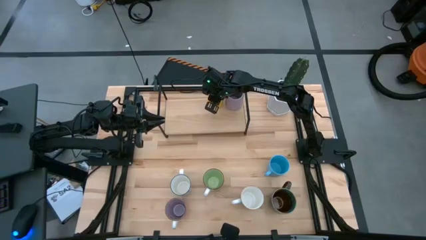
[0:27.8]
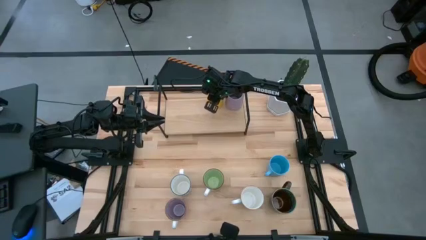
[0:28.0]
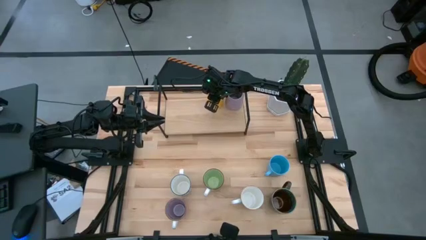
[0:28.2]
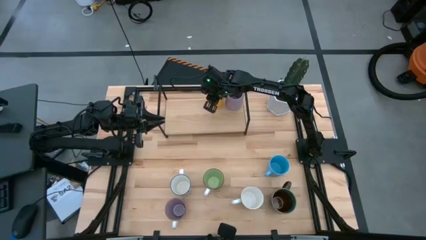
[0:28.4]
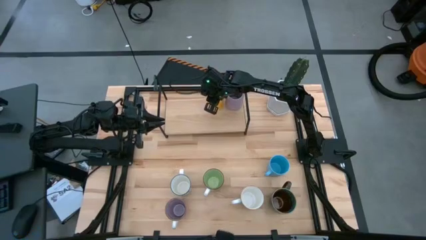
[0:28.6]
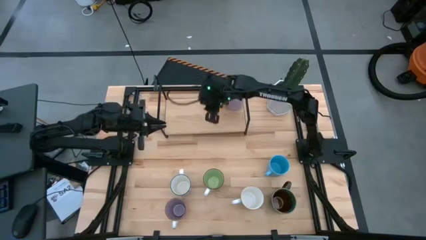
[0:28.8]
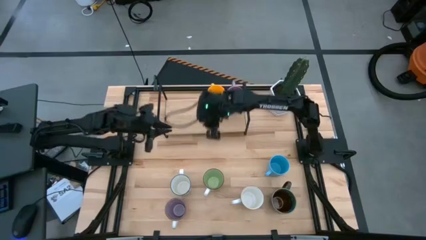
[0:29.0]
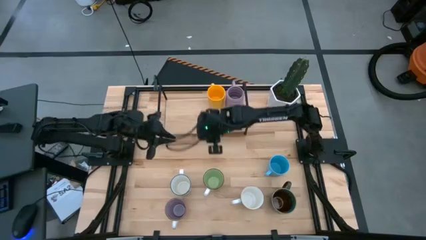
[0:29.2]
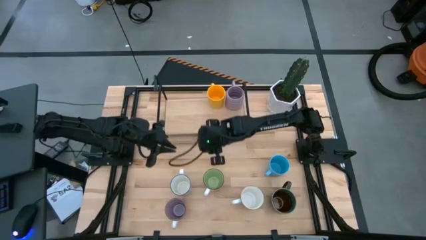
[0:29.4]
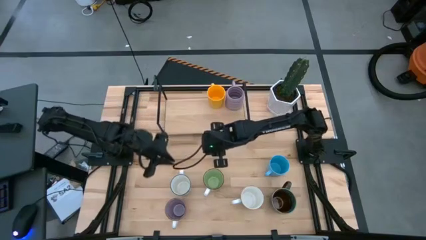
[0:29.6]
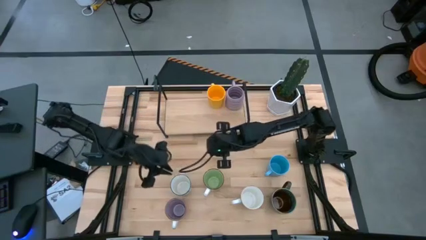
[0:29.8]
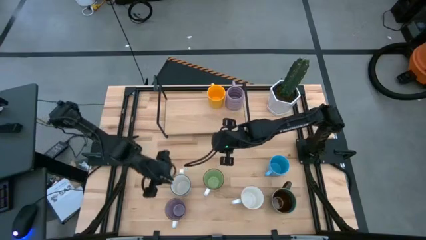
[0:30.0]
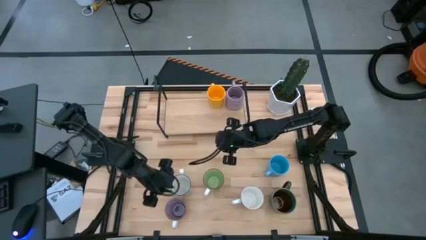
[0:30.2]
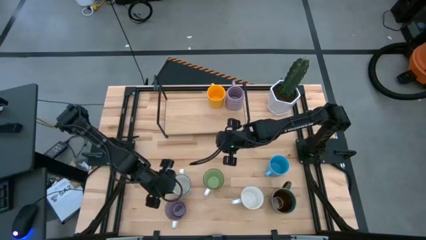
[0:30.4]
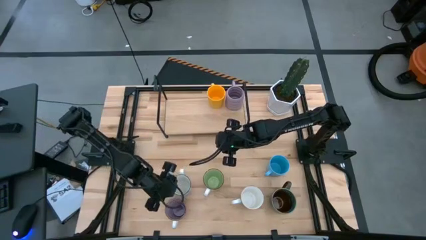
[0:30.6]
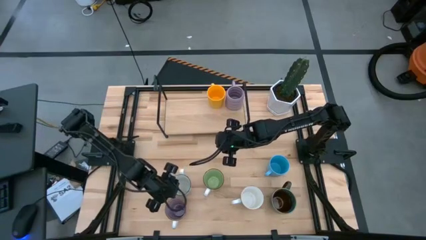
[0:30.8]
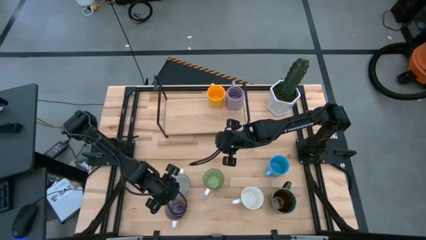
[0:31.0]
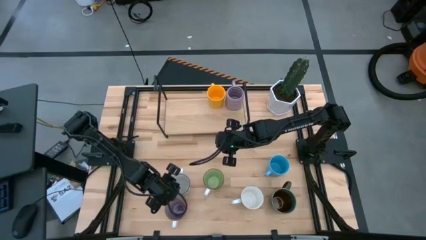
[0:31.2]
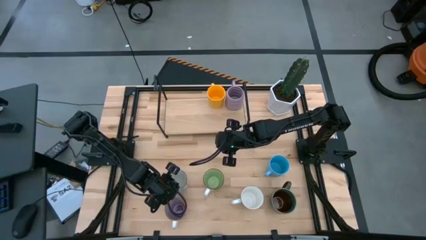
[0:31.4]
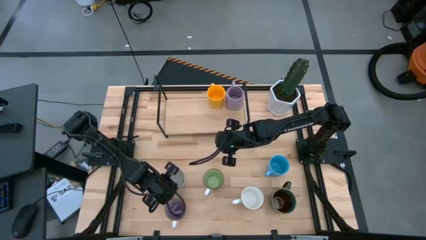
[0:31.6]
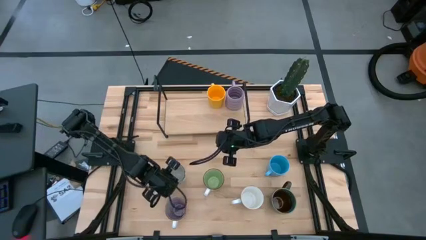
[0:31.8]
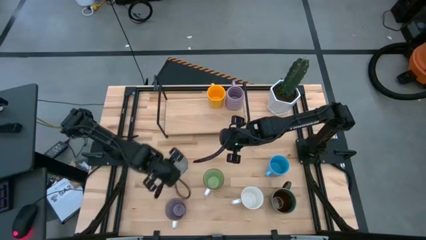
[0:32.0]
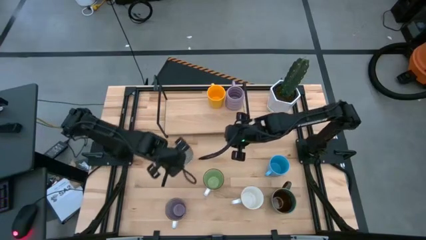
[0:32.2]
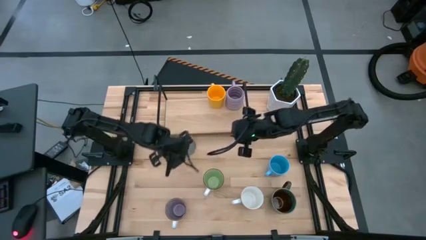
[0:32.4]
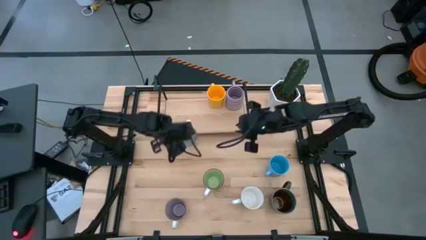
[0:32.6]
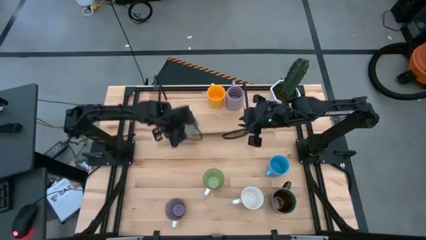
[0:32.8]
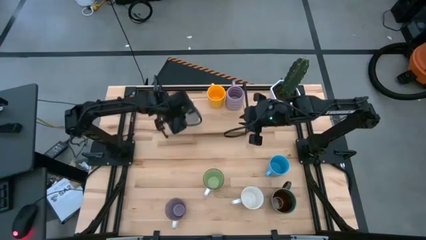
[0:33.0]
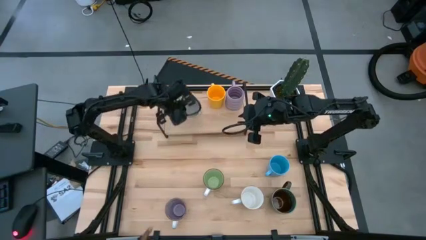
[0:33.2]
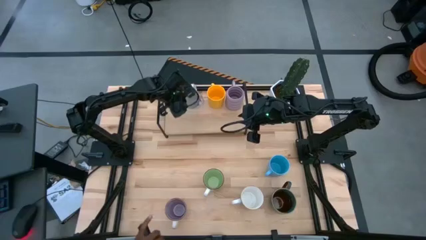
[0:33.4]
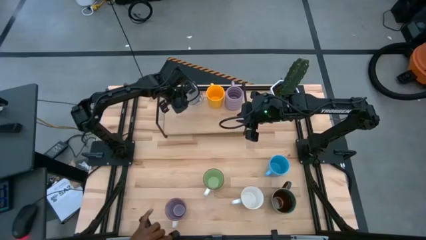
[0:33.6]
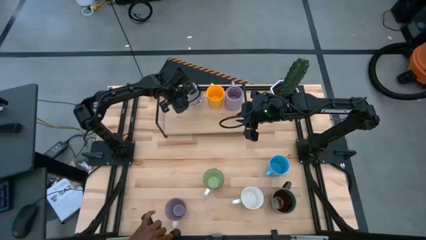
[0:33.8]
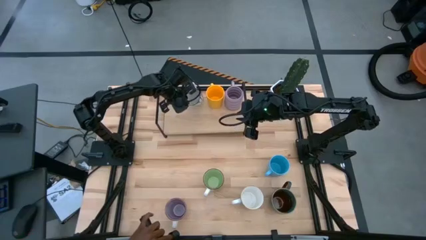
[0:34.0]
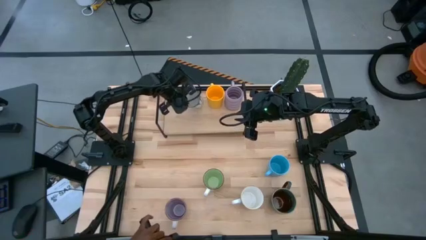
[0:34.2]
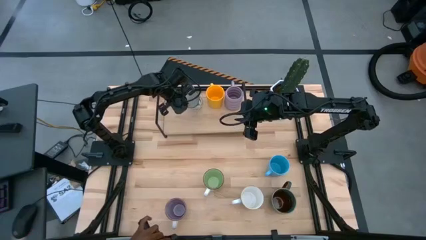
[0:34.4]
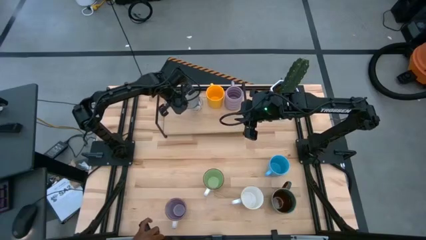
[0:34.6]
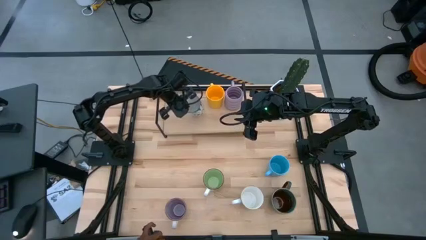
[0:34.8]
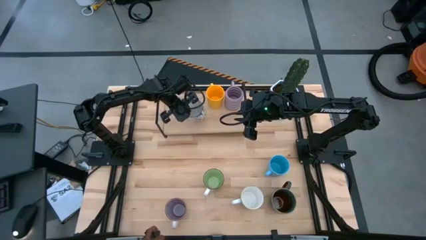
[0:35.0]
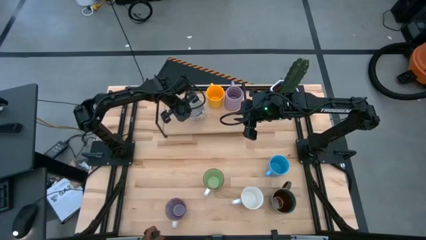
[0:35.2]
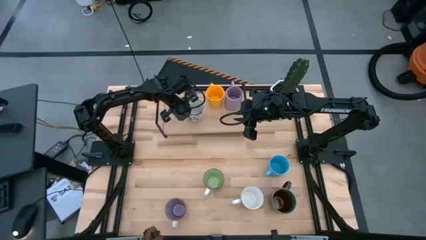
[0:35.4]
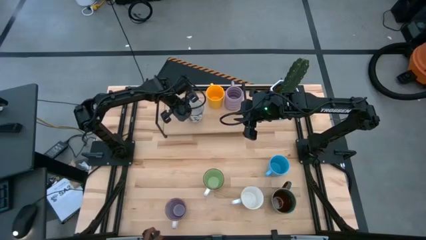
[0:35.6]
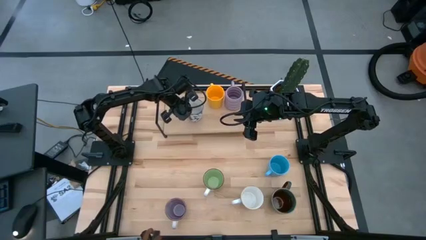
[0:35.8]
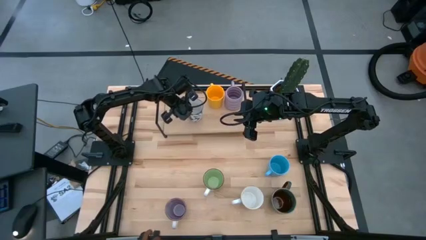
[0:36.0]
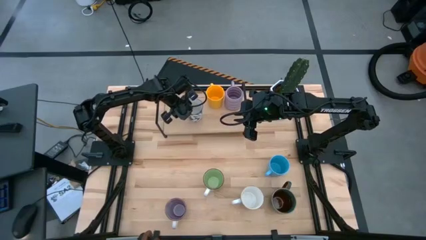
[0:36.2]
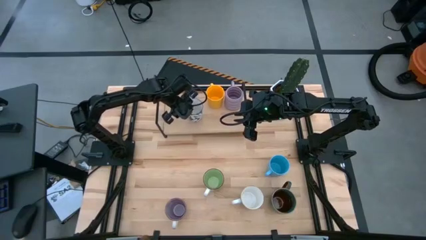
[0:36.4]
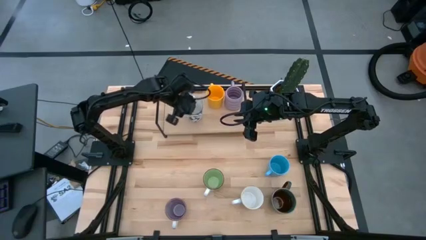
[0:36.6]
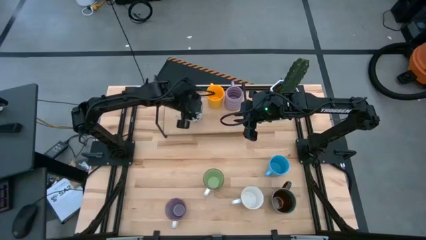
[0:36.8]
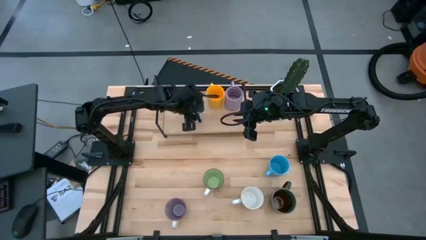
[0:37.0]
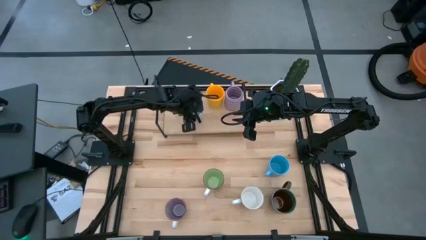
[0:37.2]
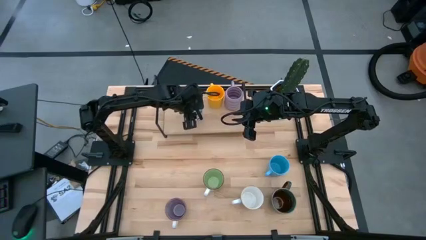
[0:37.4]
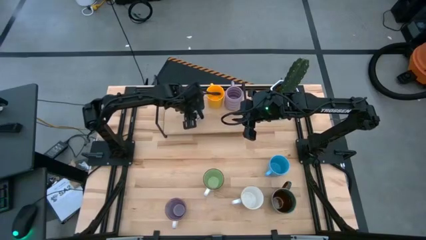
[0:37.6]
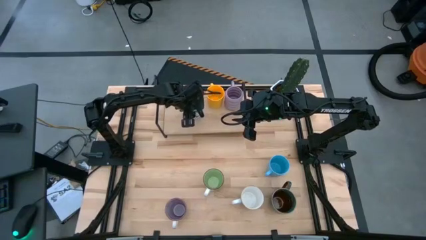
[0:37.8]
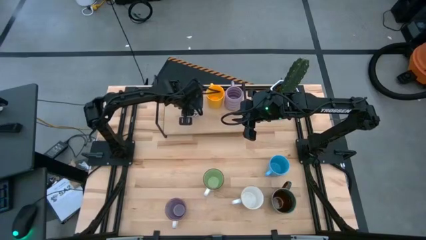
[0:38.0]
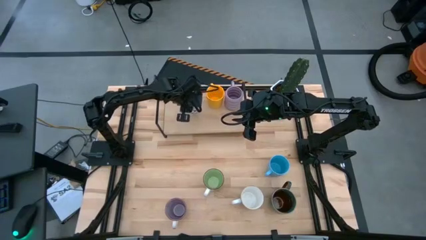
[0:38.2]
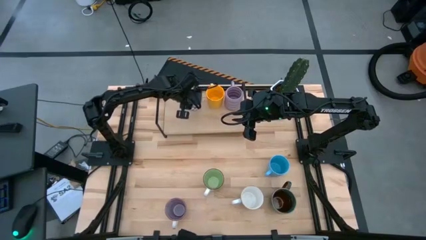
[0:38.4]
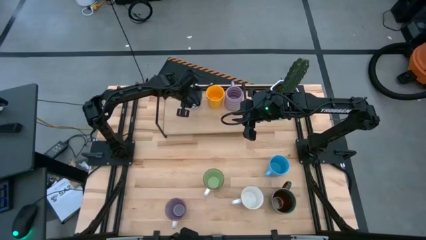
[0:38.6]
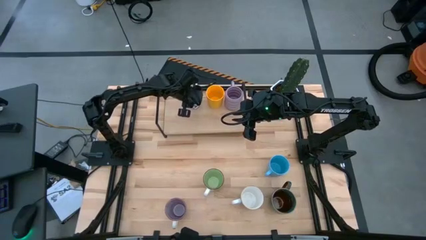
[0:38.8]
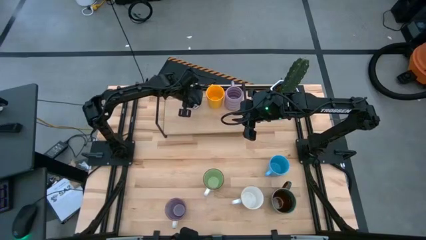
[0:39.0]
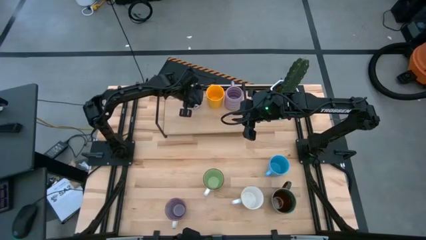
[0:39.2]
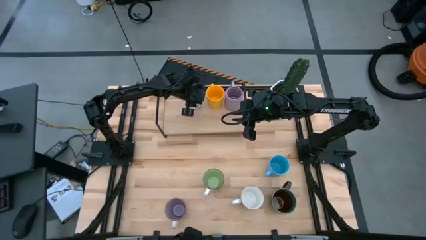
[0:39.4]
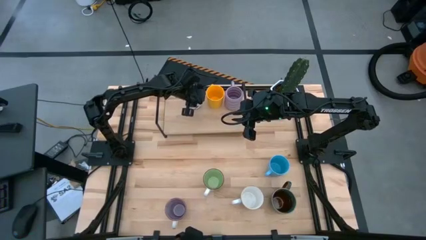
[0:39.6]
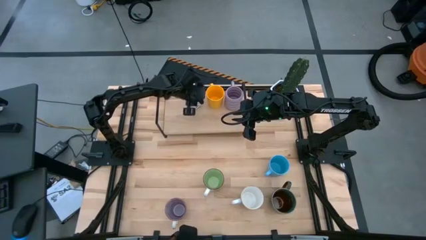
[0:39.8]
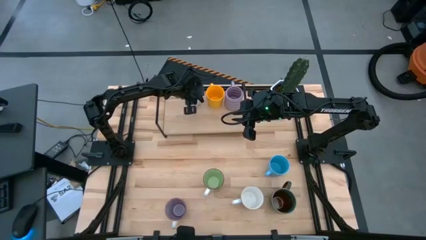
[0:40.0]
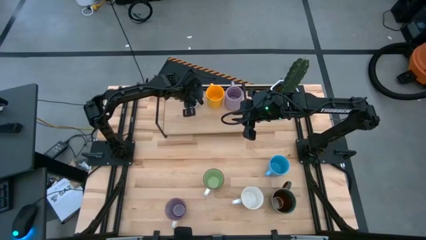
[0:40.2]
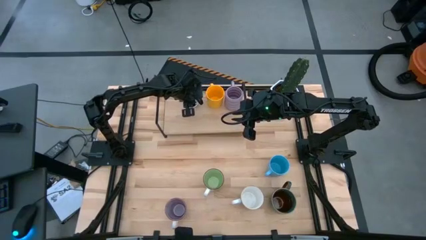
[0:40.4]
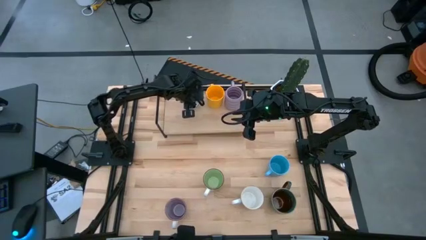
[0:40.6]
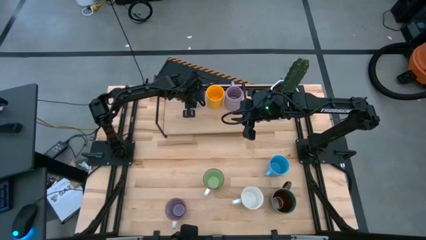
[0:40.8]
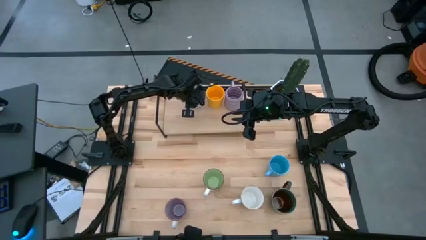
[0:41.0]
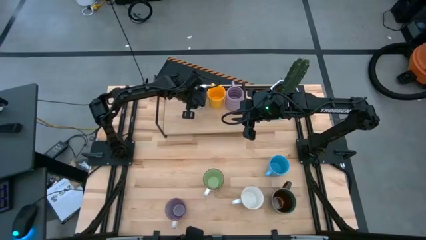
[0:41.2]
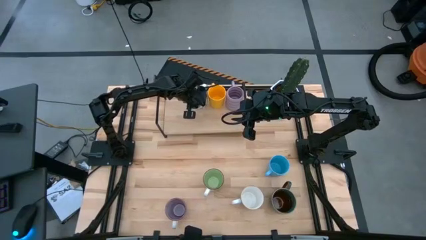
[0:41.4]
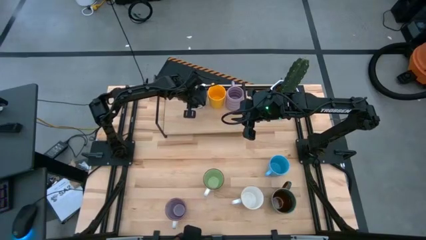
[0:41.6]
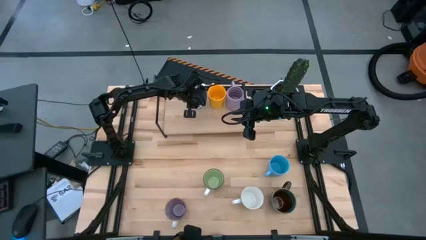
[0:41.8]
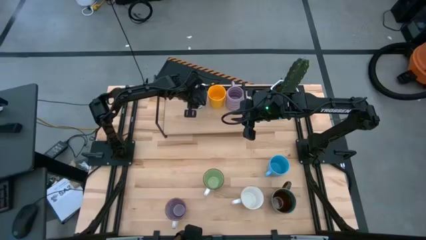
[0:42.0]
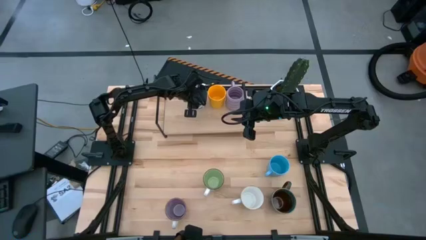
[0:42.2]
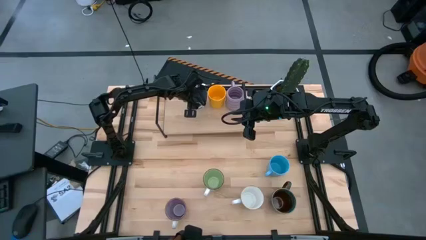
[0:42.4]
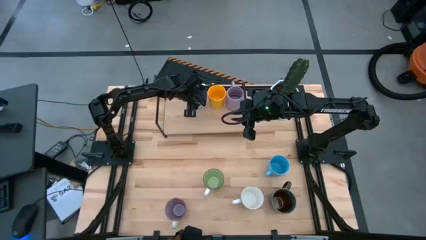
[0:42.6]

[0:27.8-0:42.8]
Task: Place coffee mugs
Put the blue mug on the shelf
